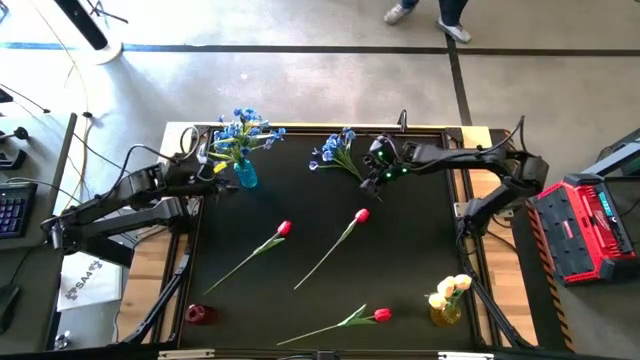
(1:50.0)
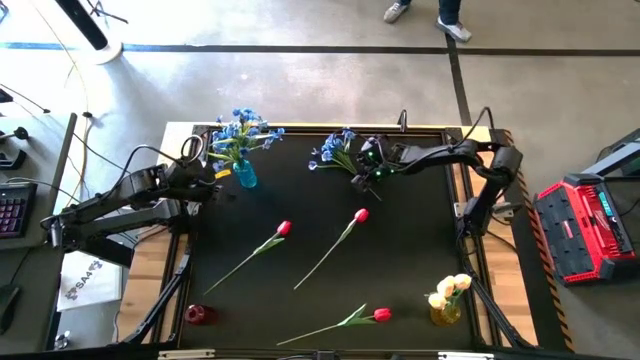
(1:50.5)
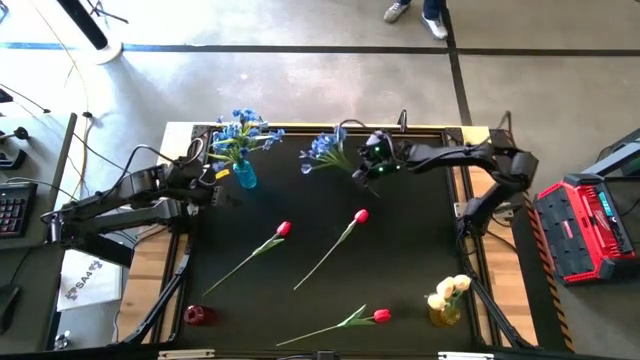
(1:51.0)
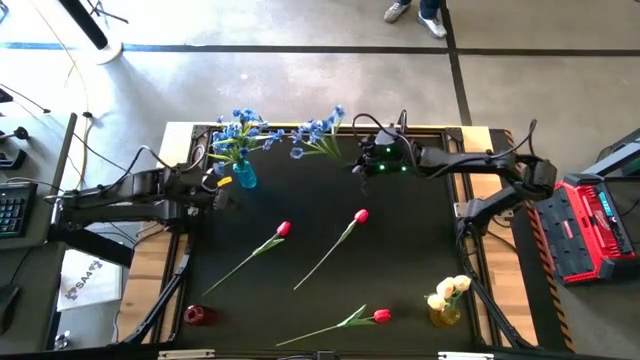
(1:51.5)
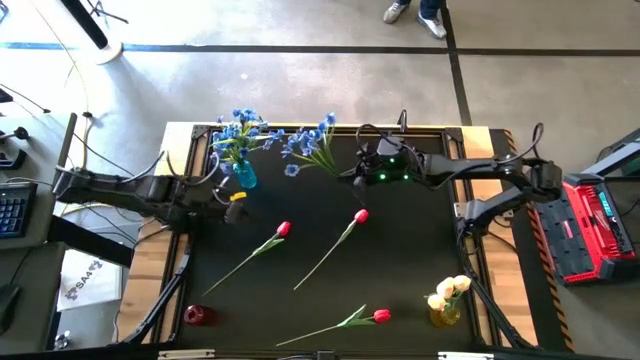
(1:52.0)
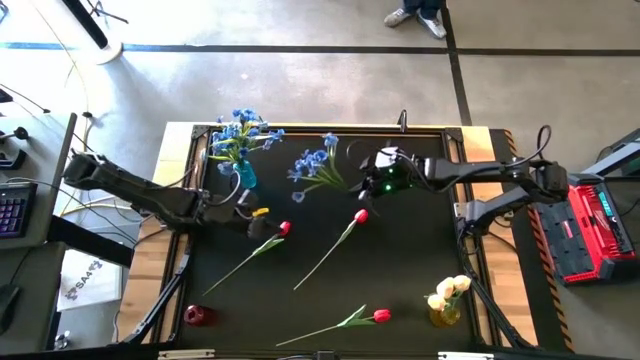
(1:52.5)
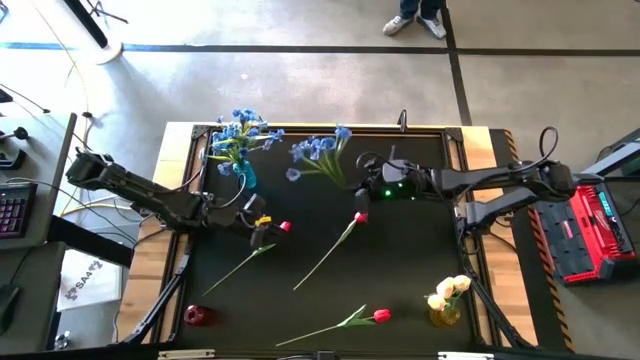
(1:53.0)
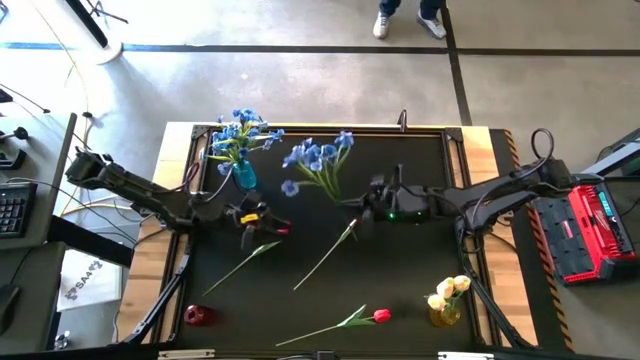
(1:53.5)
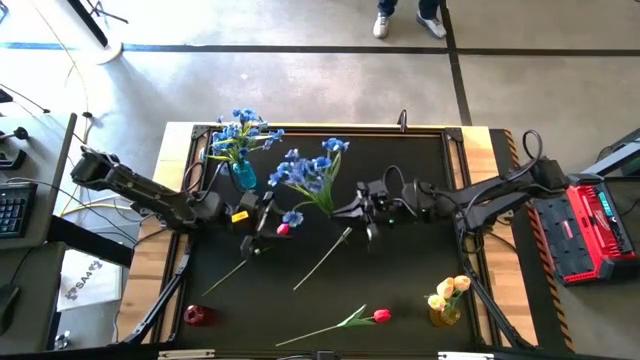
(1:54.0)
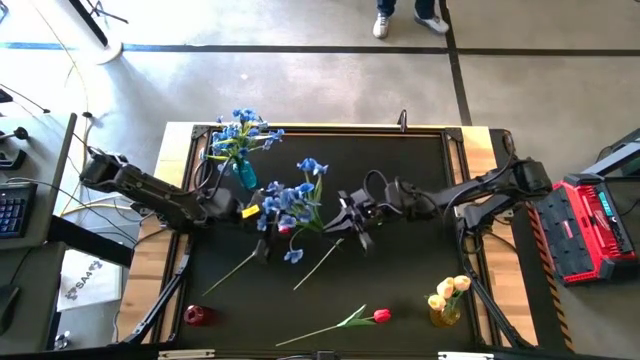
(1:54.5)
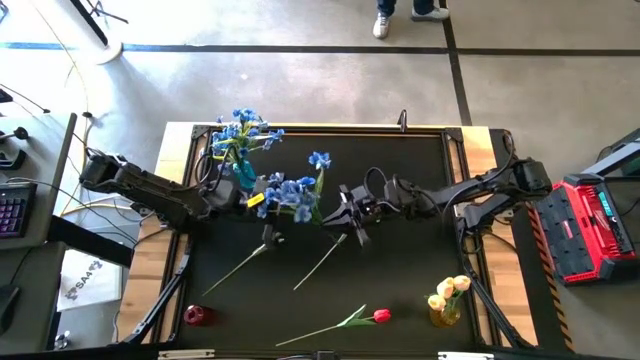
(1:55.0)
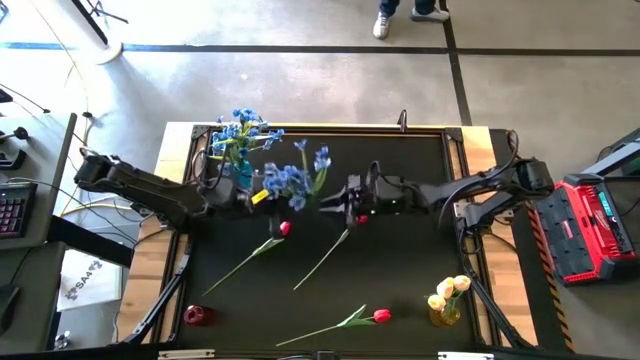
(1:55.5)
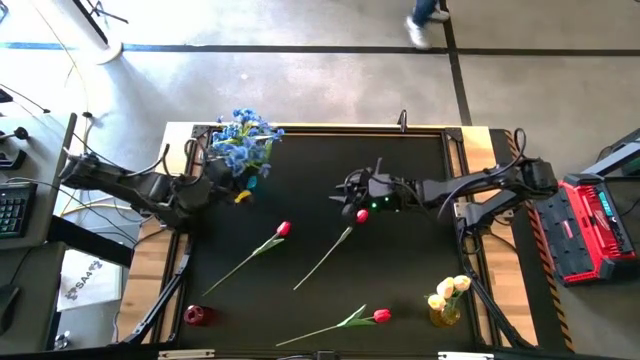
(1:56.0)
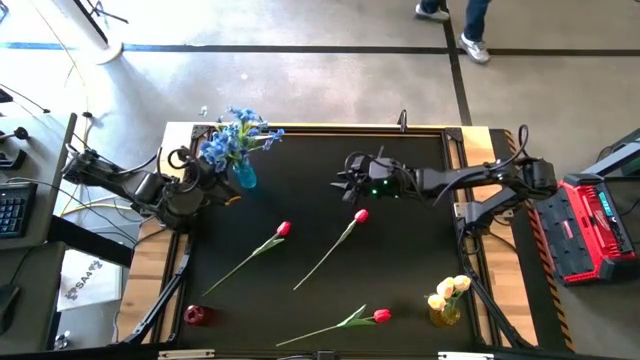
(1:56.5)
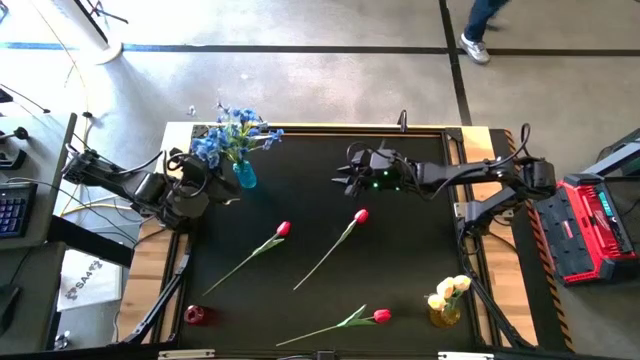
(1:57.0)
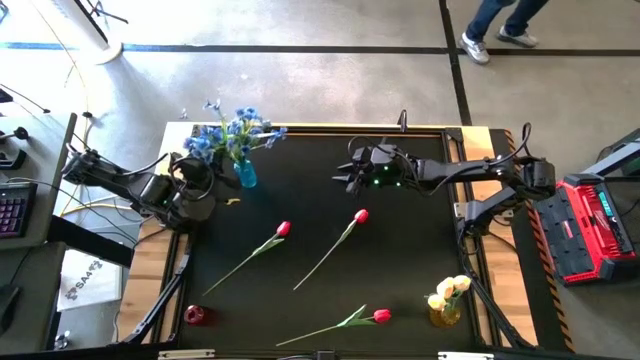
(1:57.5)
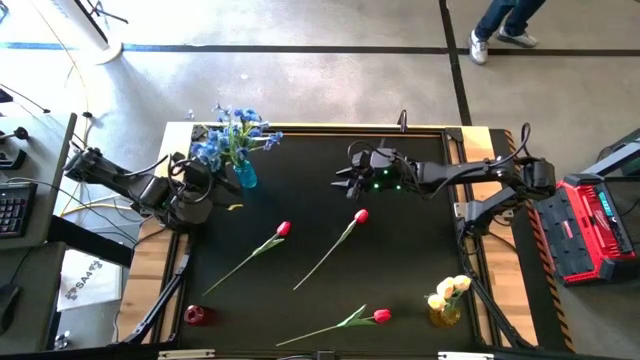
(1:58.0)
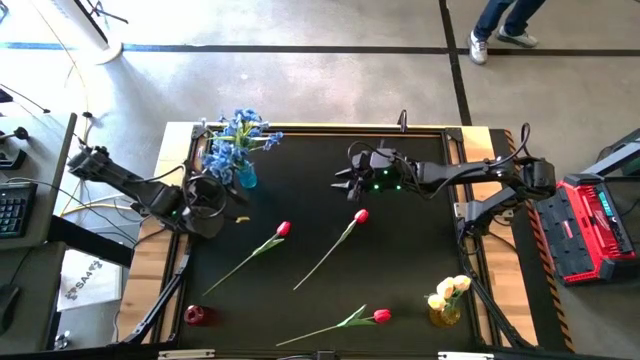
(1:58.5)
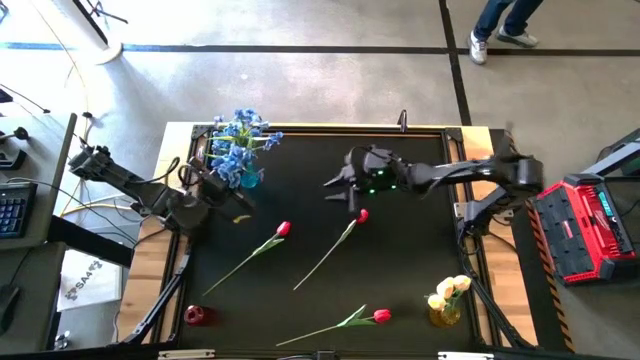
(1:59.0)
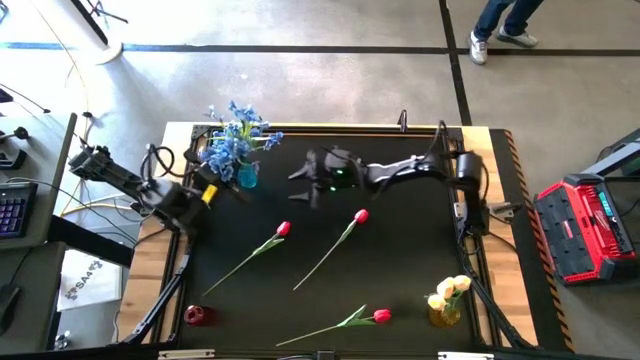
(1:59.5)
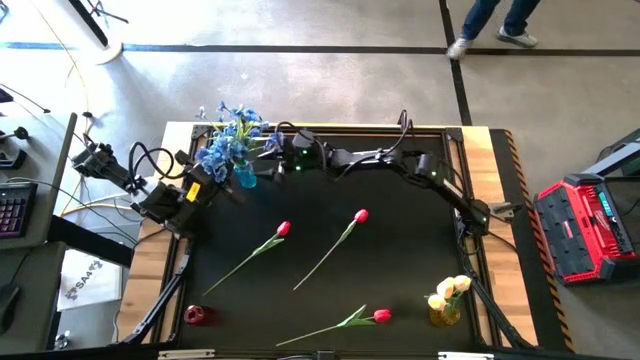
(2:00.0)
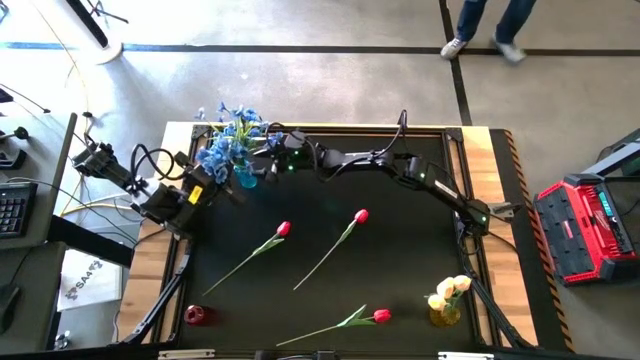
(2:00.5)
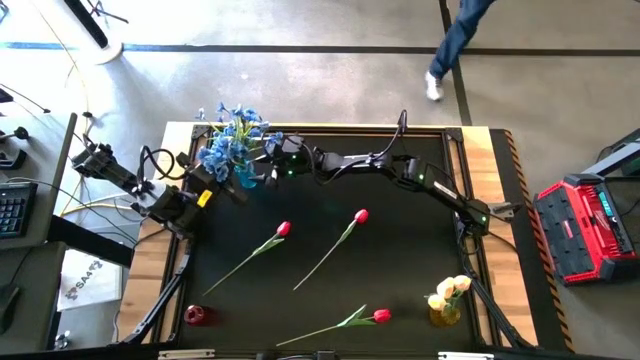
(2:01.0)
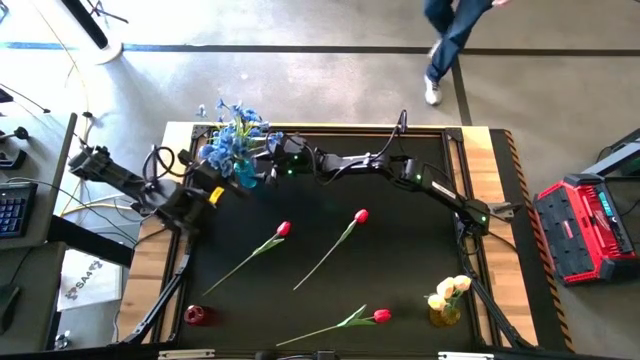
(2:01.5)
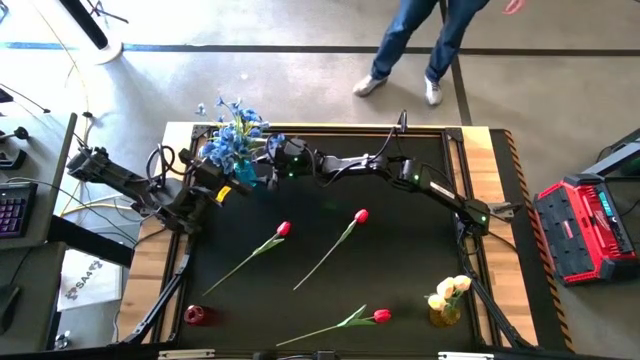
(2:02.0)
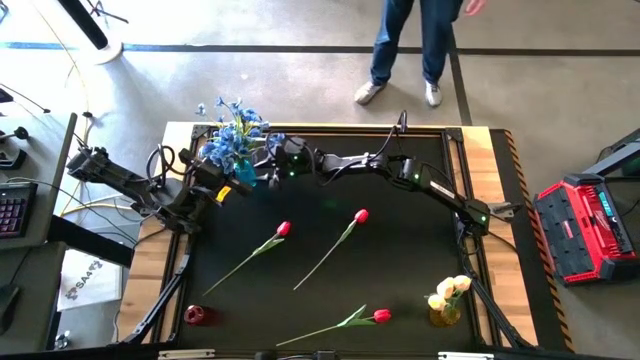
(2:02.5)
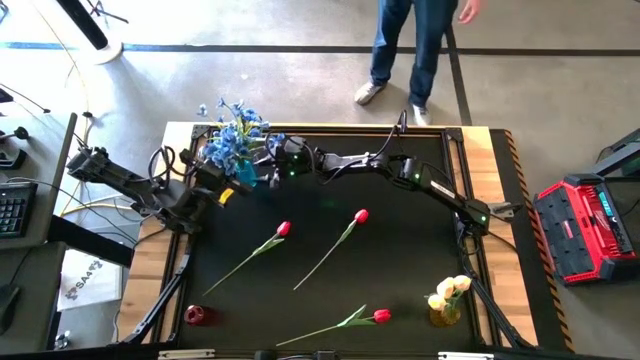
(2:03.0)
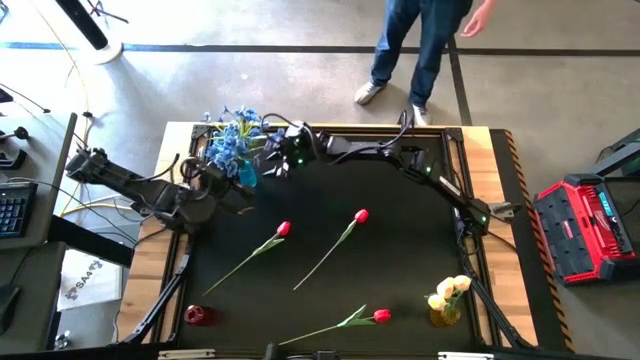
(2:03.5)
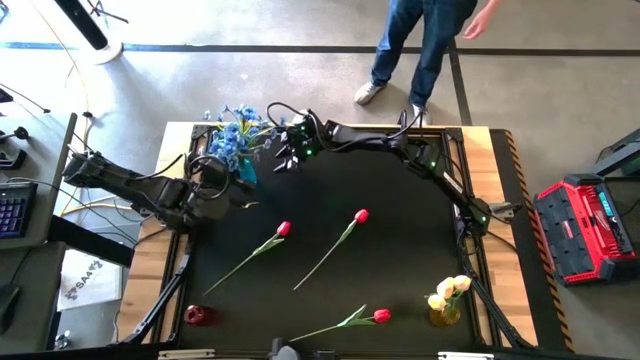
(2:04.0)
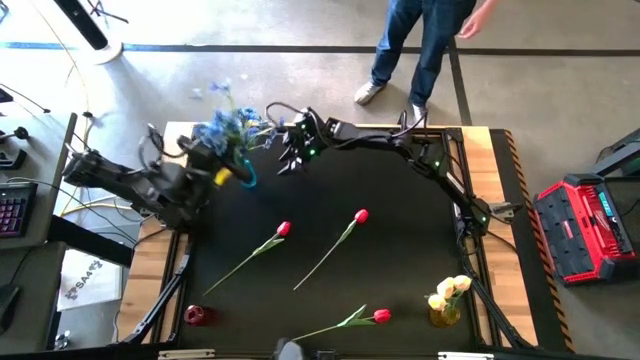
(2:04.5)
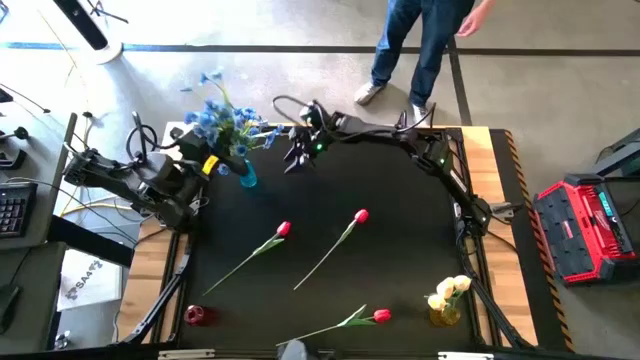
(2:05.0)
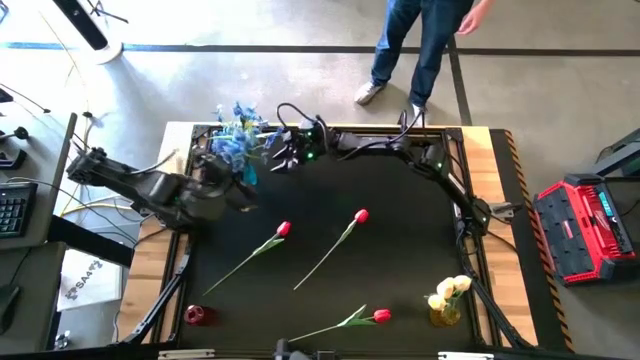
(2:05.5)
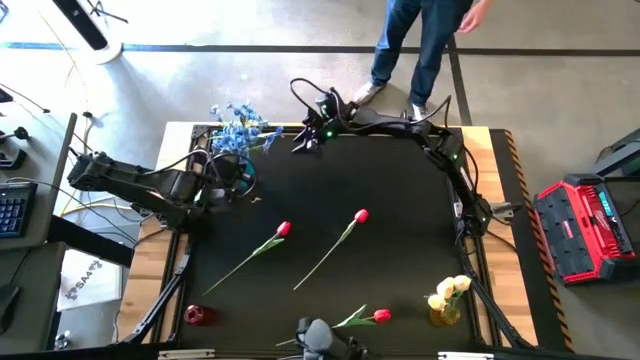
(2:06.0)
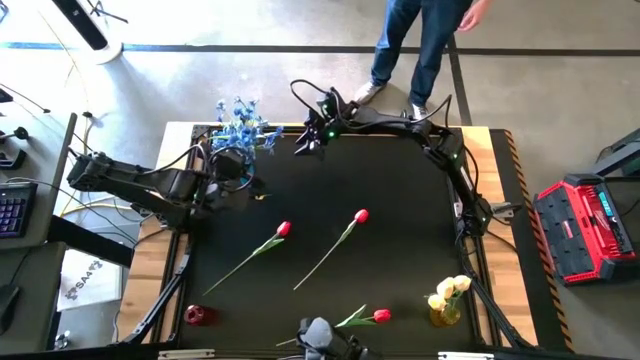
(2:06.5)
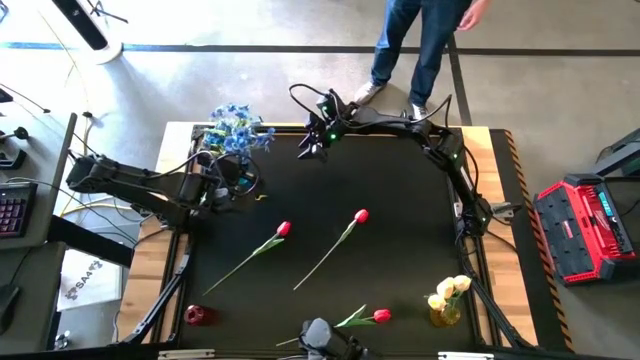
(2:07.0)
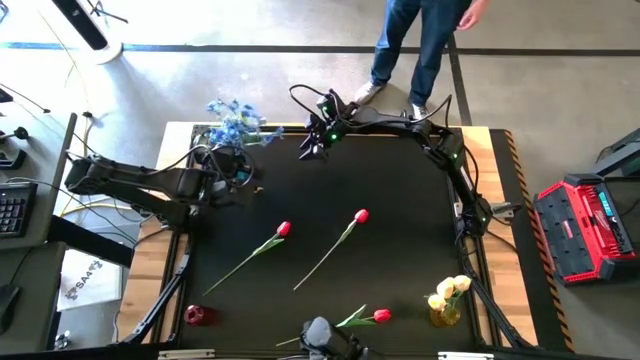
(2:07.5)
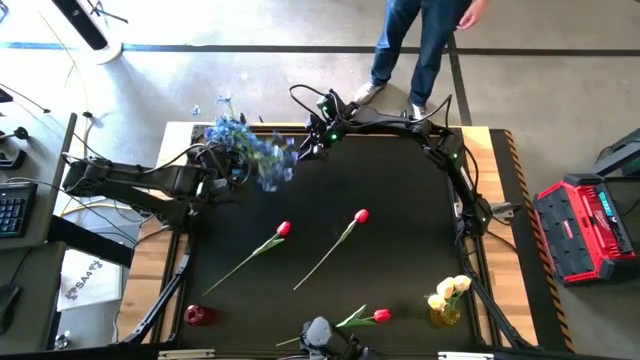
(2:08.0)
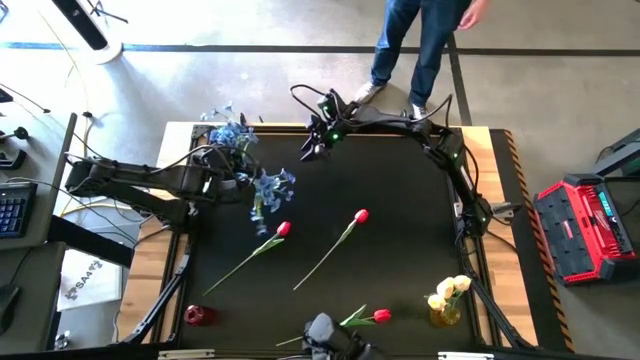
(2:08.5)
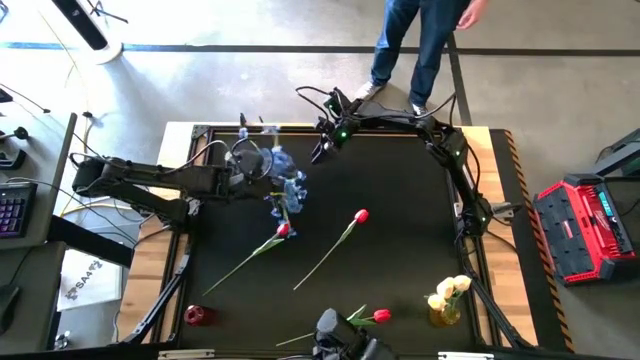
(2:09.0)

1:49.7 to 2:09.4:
Task: Sort flowers into vase by color
Put the blue flowers into the blue vase
